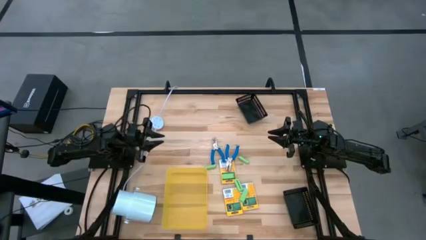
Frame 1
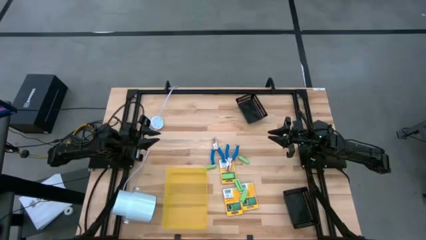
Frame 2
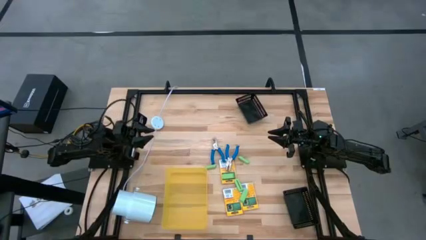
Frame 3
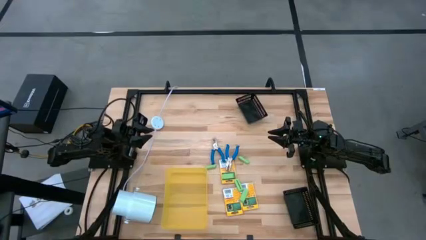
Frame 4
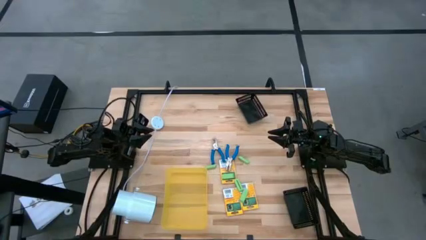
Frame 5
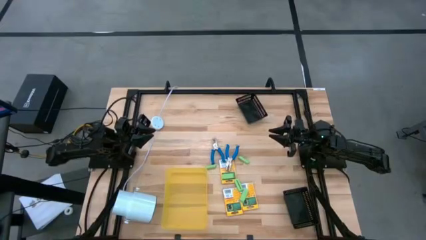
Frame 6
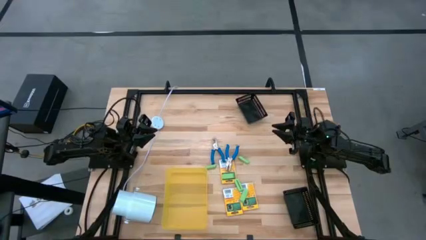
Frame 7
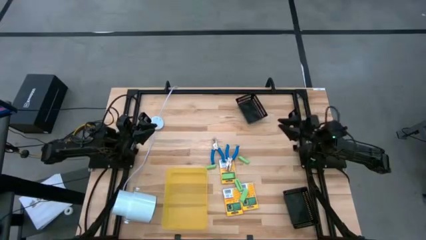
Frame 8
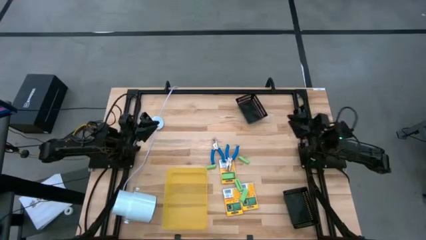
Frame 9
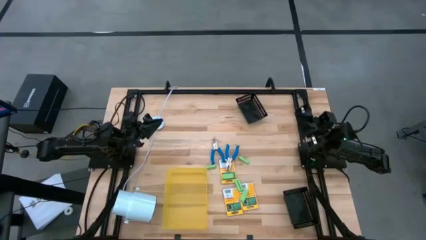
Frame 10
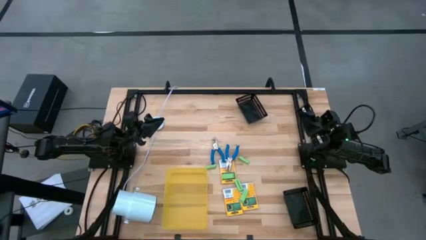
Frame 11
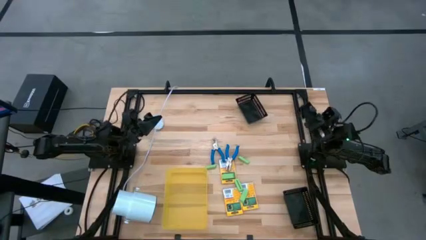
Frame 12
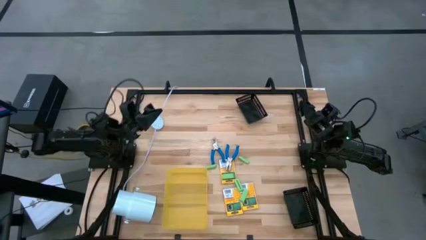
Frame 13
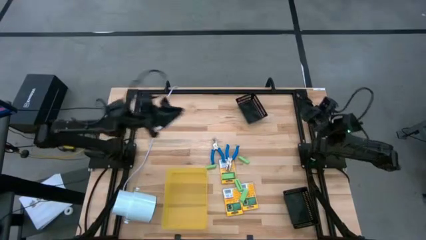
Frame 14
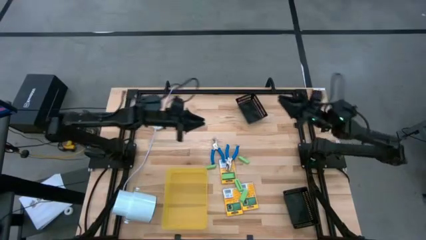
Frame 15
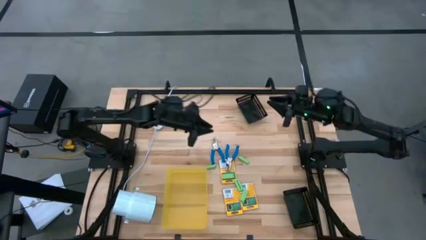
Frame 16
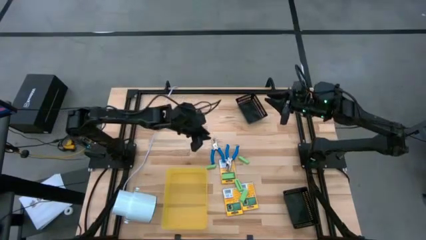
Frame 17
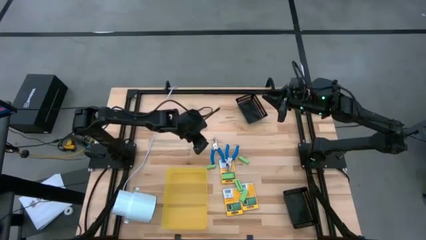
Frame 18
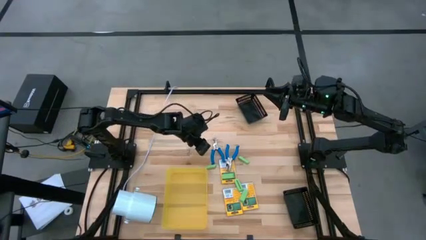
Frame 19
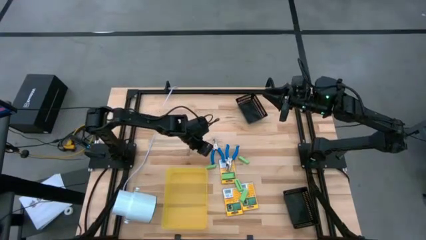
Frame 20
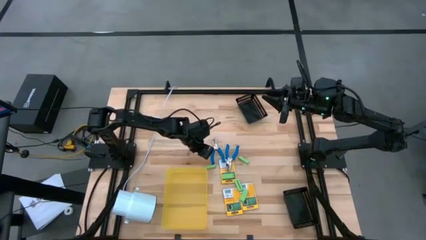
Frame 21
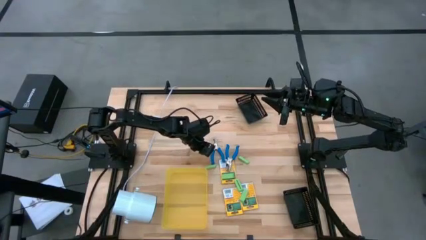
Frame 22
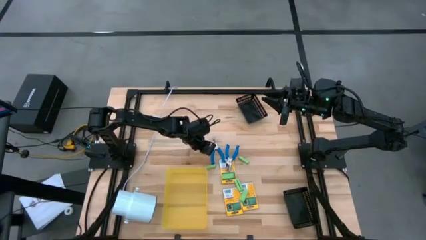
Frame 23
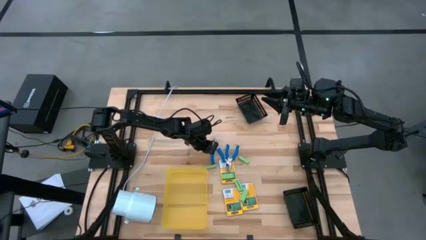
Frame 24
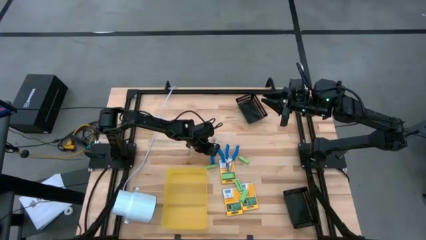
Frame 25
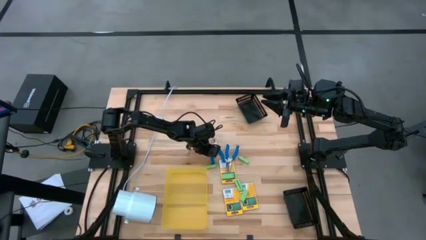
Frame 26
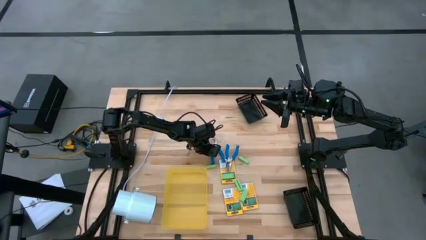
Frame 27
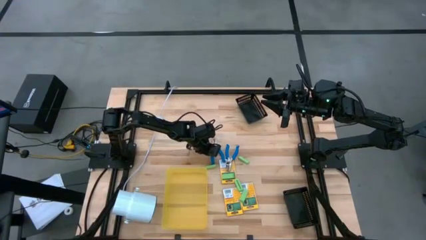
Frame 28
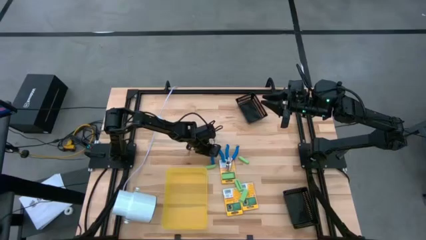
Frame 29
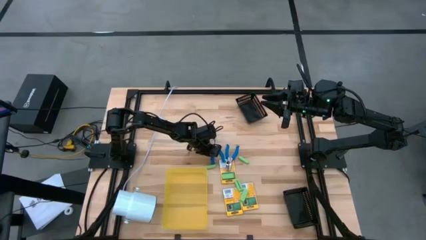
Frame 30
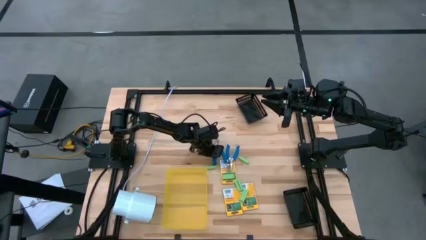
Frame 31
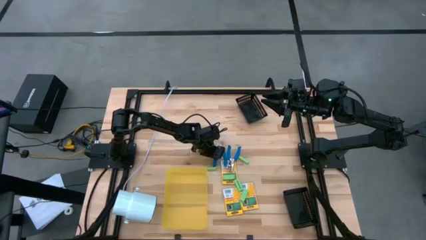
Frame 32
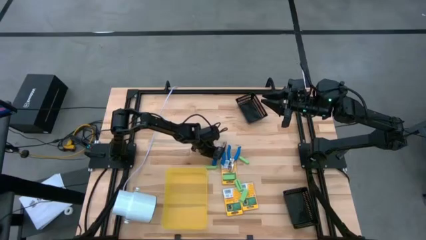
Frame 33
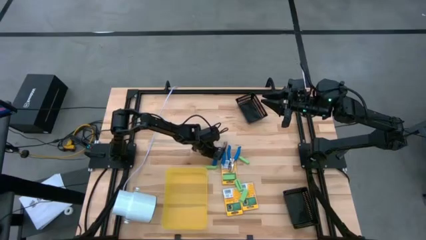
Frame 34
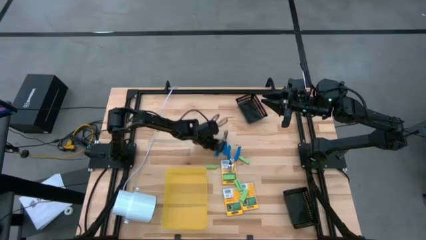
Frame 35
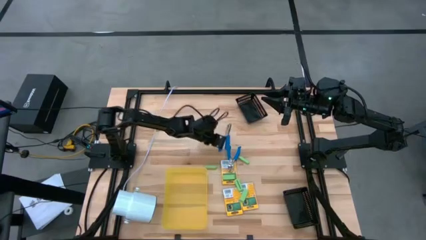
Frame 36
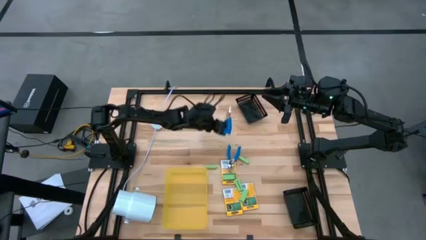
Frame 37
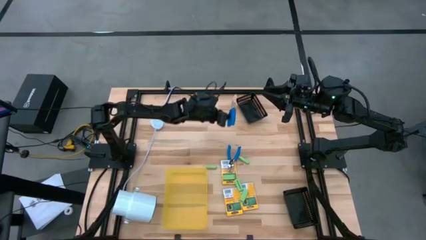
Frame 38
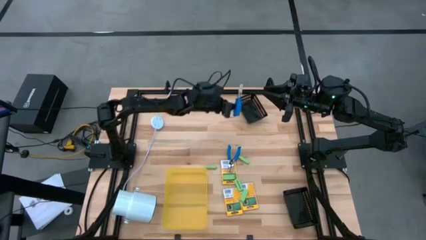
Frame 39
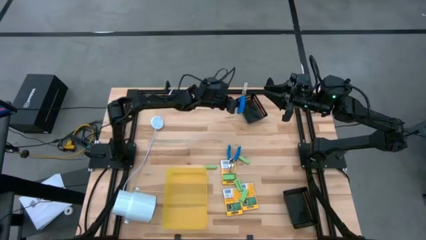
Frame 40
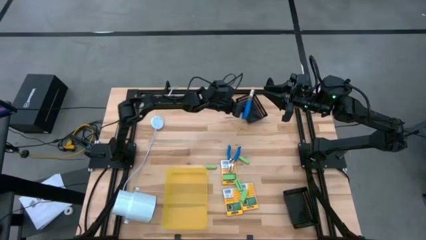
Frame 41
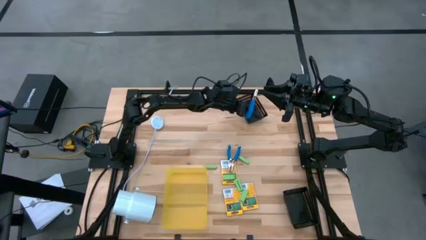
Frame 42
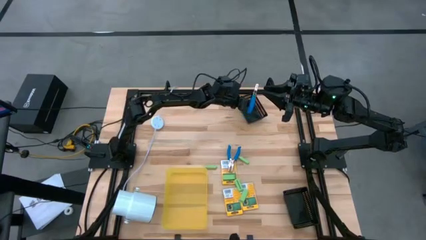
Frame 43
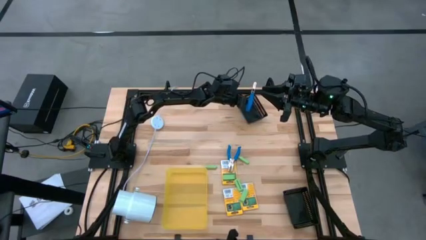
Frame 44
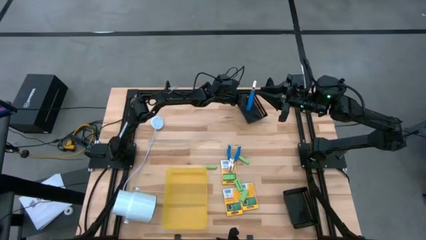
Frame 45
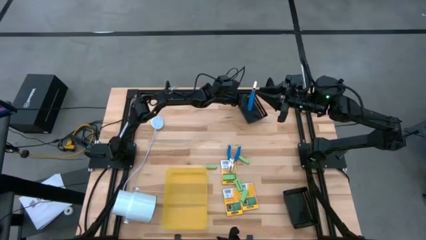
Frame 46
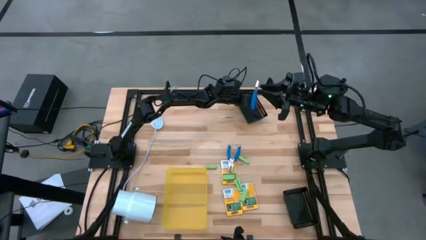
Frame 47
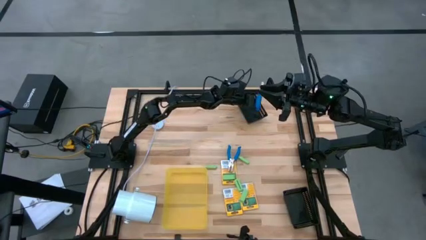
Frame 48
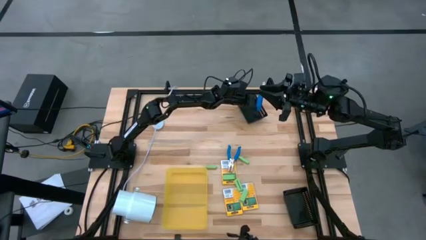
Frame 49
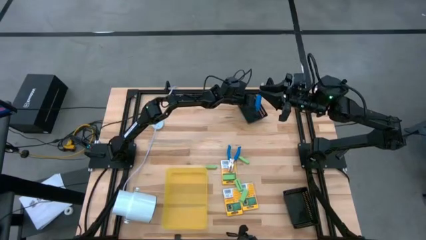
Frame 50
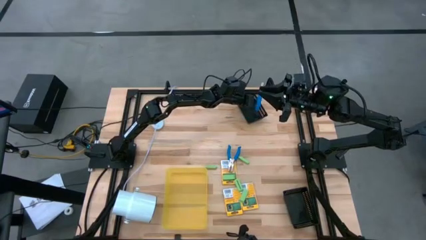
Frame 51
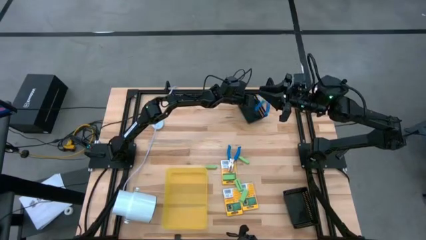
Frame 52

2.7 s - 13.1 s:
Task: Pick & Place School Supplies
Put the blue punch plier into the top black bin

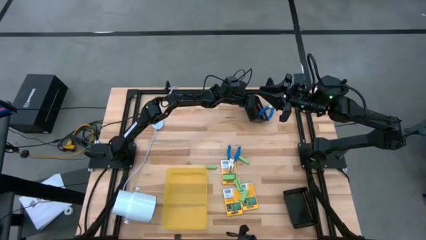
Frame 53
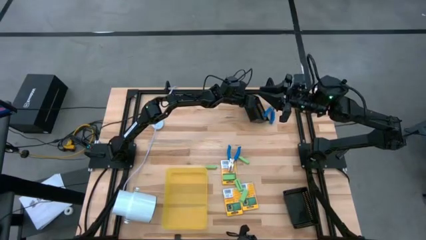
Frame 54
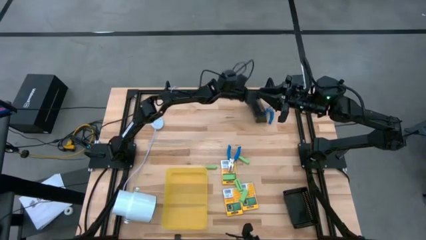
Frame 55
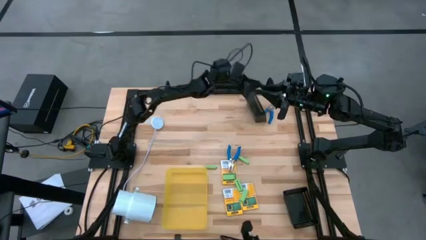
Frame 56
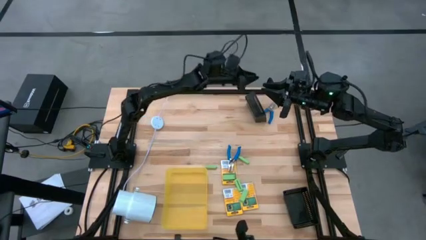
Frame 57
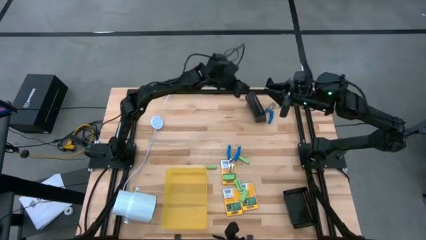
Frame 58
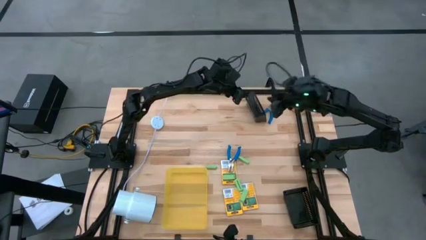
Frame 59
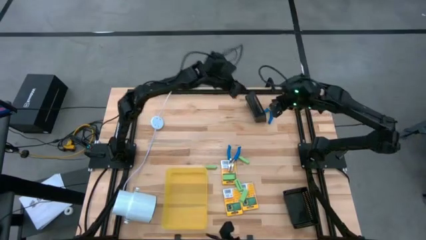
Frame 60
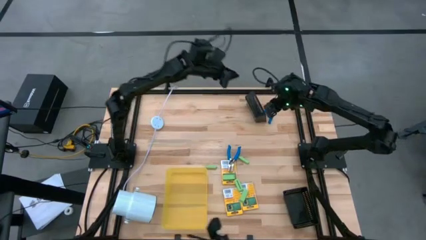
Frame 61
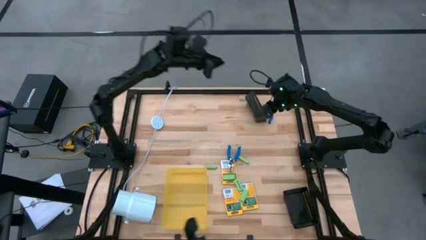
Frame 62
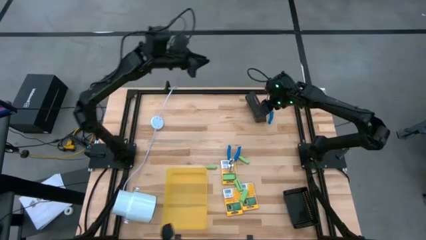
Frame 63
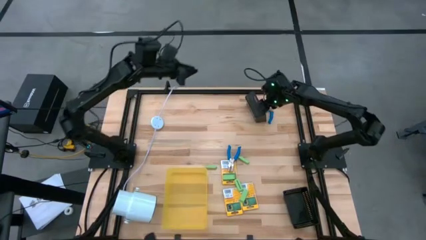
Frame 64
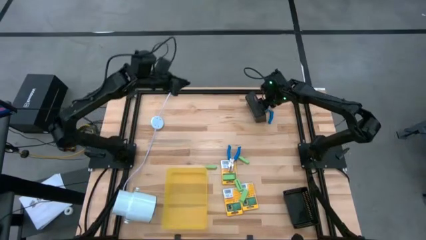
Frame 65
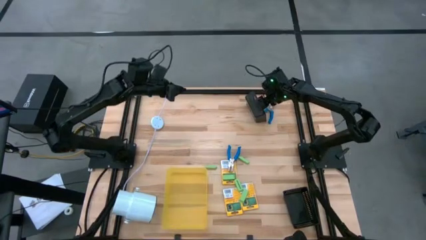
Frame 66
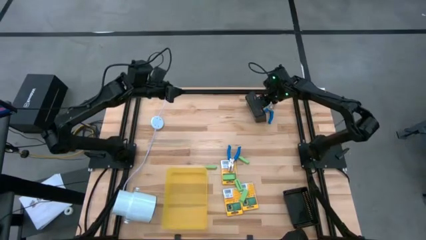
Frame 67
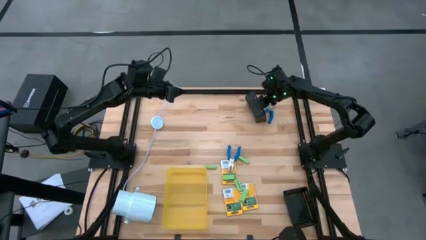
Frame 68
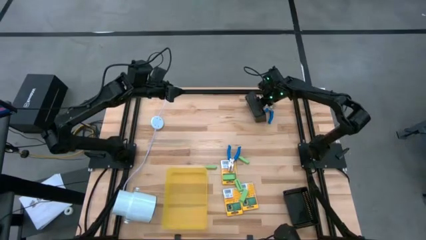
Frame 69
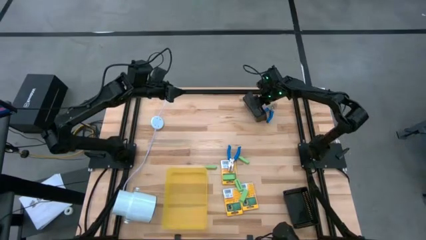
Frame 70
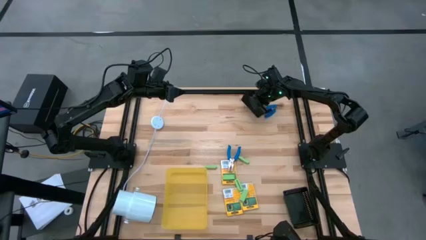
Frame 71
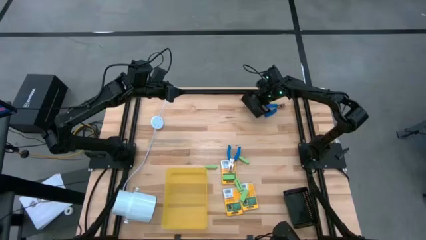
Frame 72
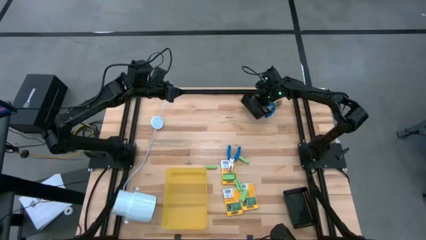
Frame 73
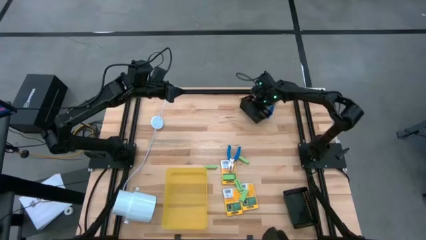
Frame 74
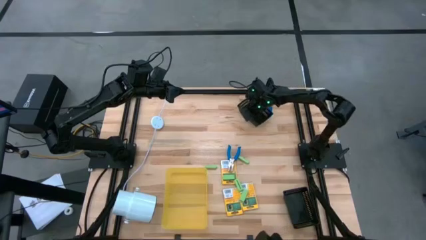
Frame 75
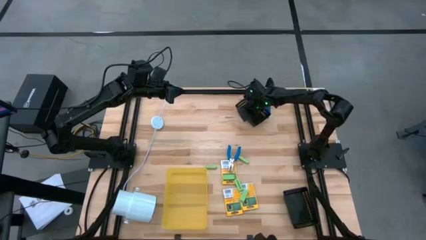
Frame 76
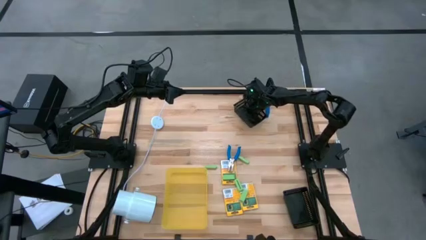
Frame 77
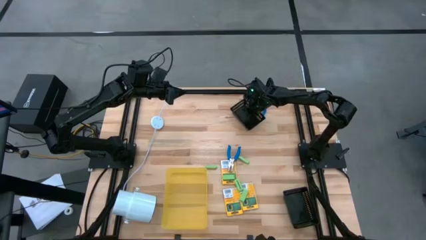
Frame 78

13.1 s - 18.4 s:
Adjust the top black bin on the table
